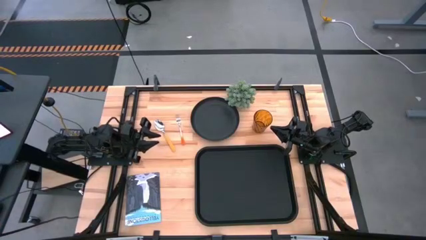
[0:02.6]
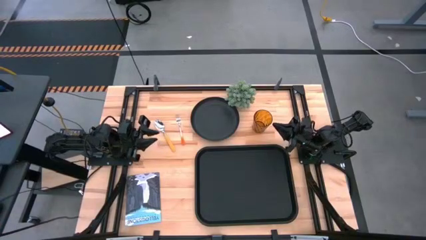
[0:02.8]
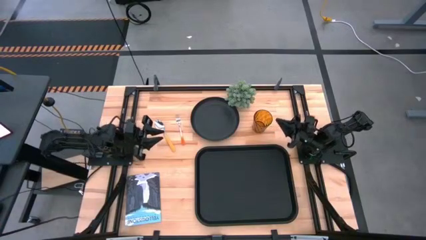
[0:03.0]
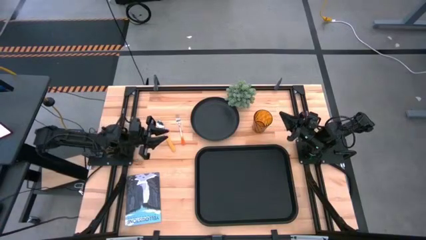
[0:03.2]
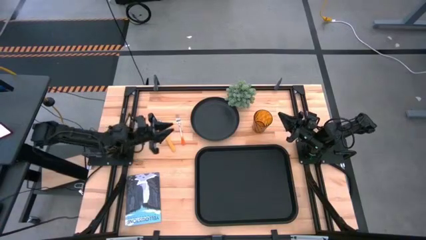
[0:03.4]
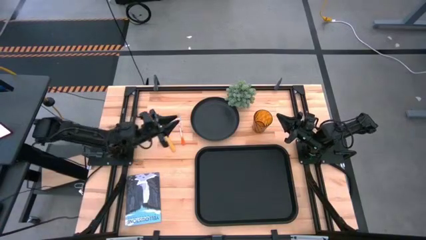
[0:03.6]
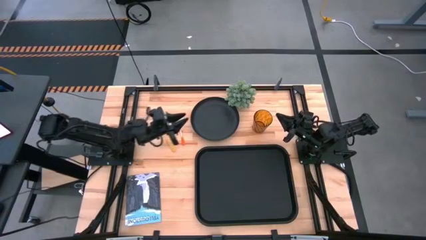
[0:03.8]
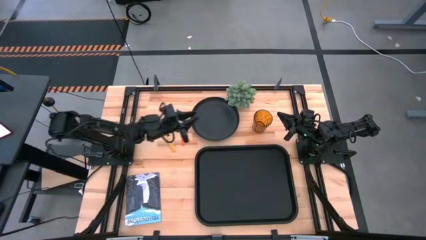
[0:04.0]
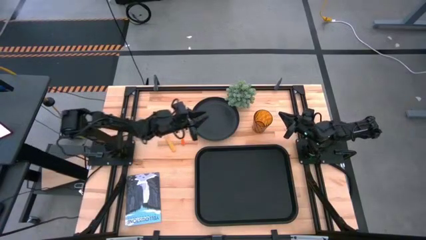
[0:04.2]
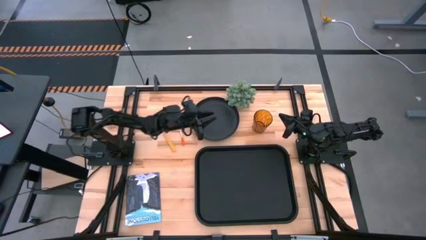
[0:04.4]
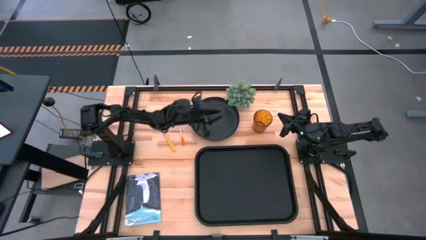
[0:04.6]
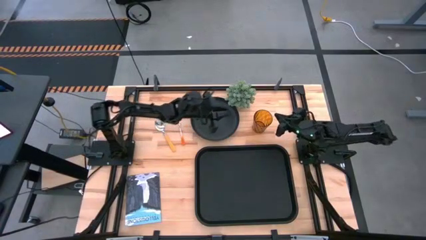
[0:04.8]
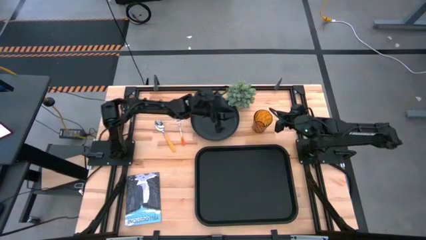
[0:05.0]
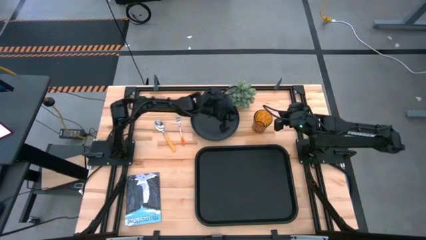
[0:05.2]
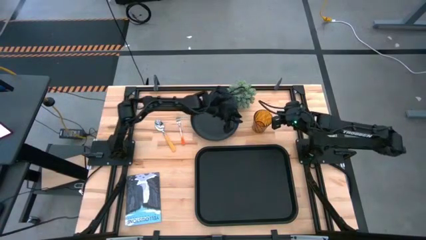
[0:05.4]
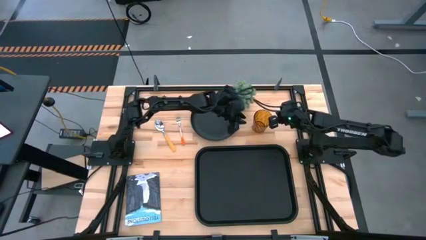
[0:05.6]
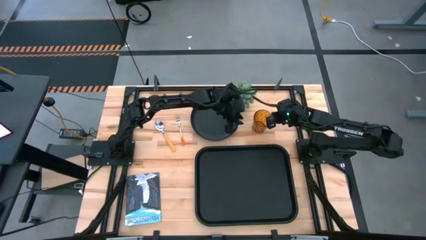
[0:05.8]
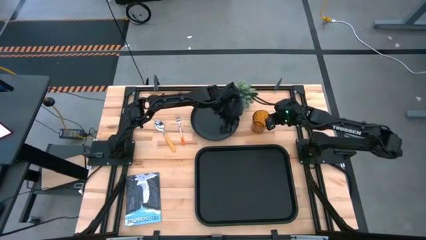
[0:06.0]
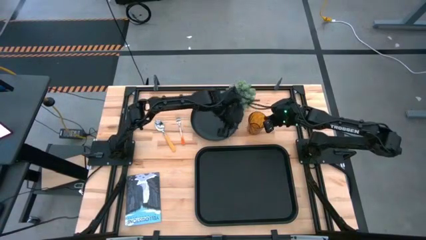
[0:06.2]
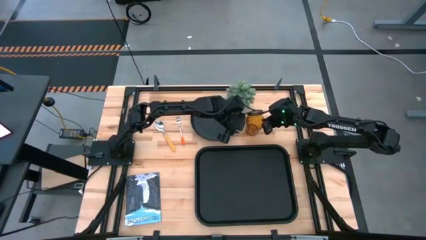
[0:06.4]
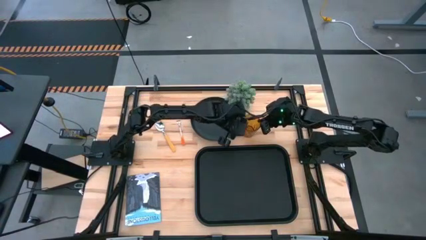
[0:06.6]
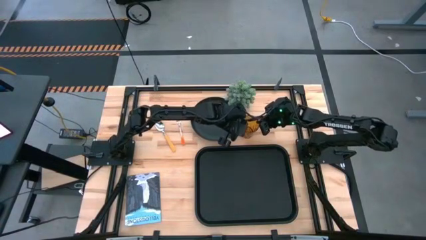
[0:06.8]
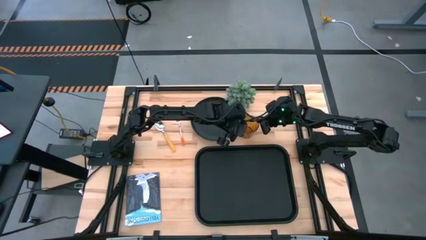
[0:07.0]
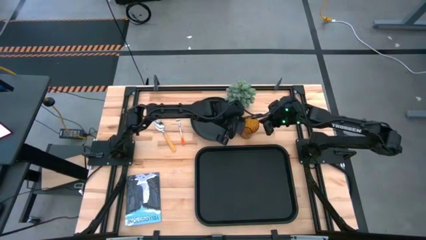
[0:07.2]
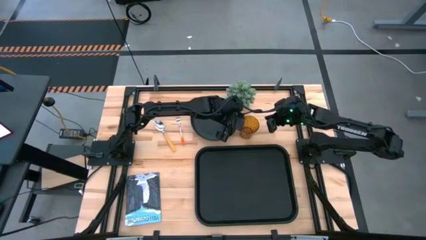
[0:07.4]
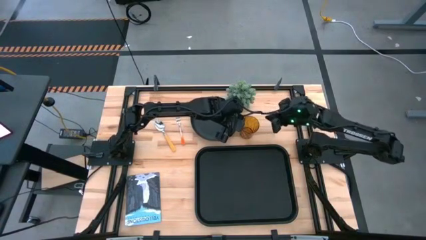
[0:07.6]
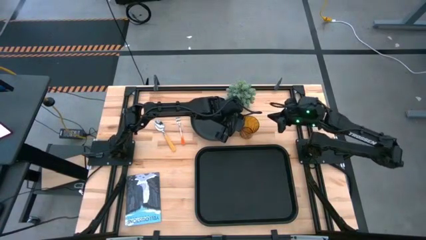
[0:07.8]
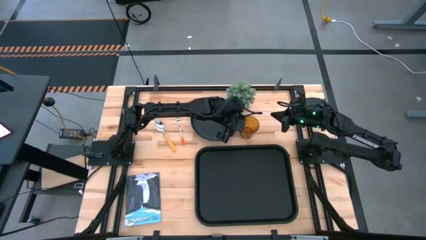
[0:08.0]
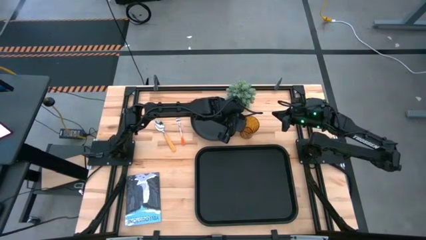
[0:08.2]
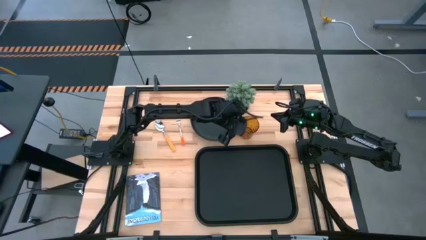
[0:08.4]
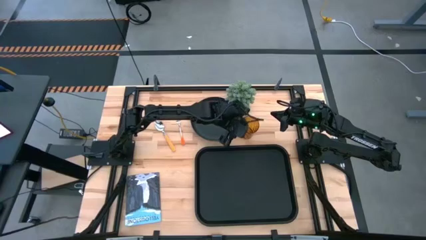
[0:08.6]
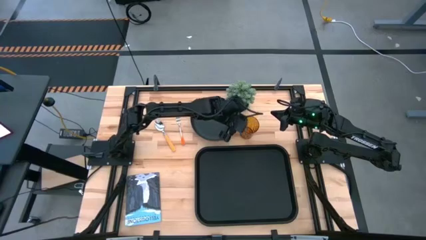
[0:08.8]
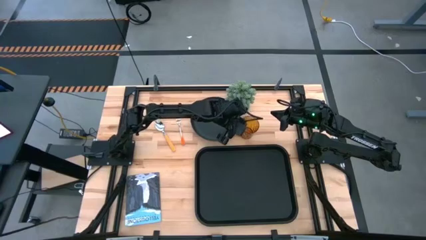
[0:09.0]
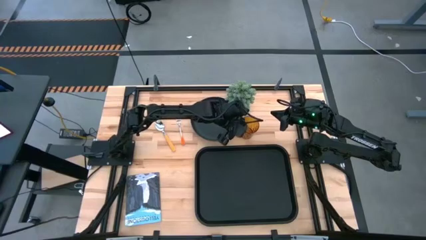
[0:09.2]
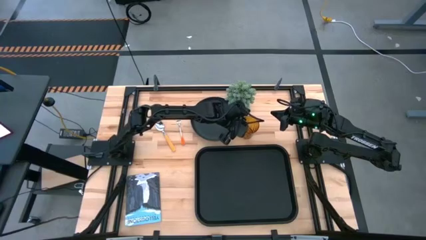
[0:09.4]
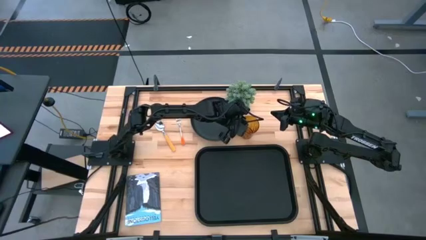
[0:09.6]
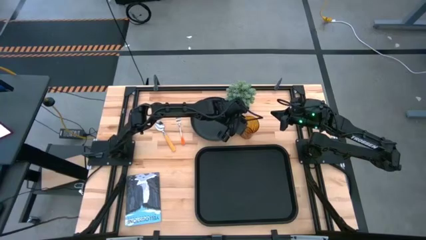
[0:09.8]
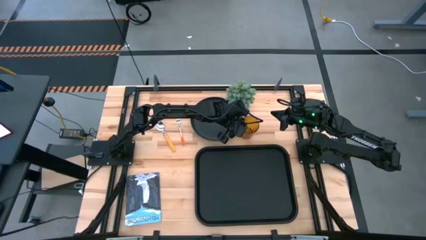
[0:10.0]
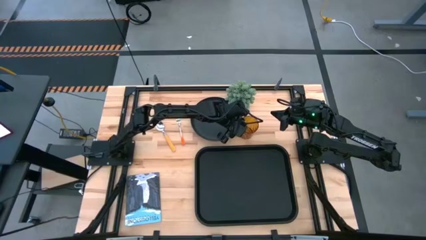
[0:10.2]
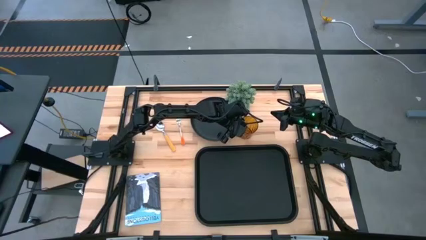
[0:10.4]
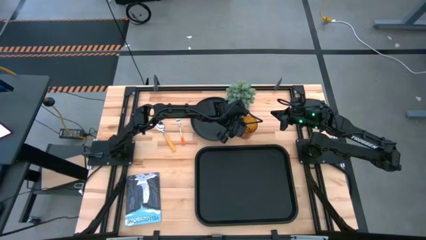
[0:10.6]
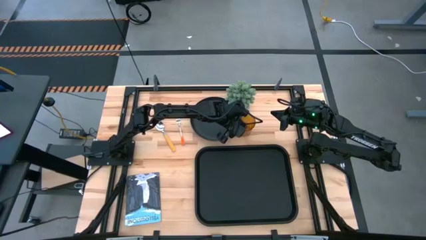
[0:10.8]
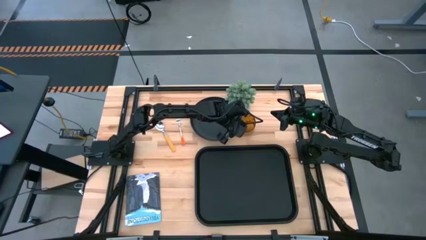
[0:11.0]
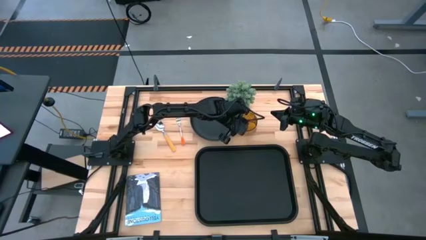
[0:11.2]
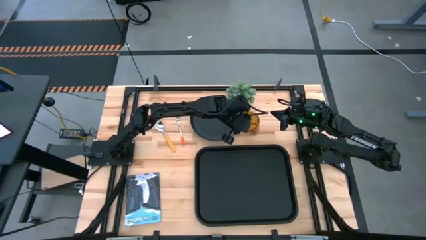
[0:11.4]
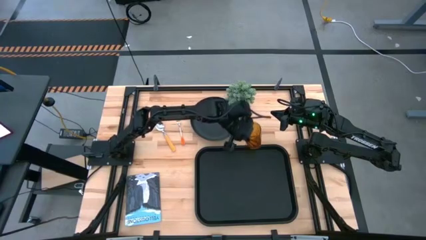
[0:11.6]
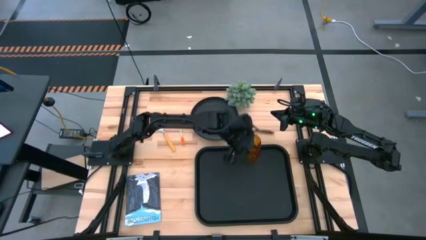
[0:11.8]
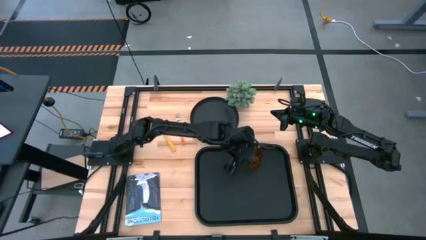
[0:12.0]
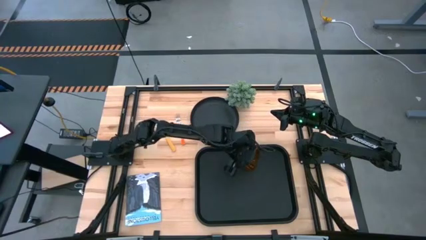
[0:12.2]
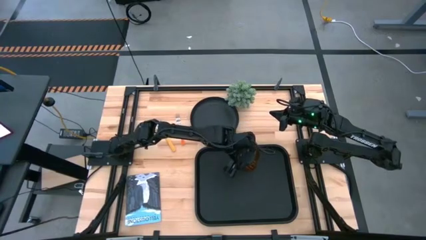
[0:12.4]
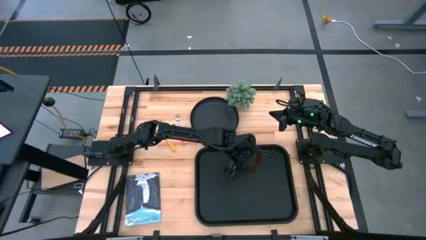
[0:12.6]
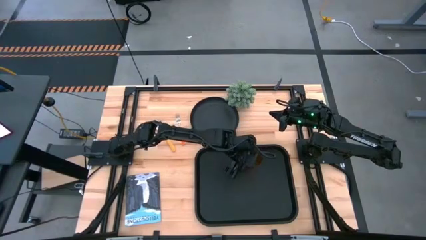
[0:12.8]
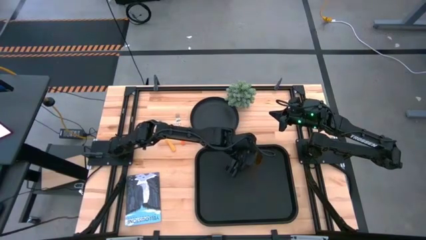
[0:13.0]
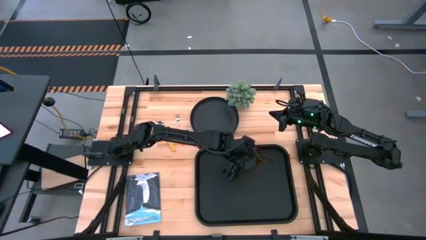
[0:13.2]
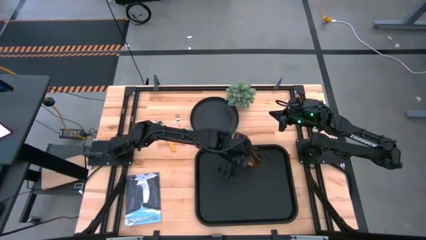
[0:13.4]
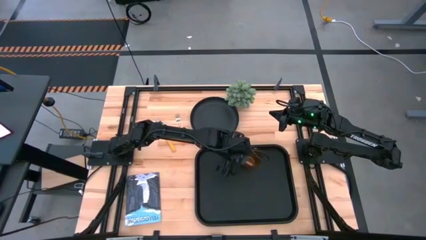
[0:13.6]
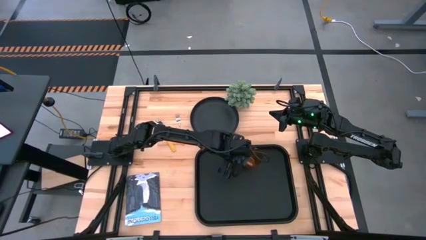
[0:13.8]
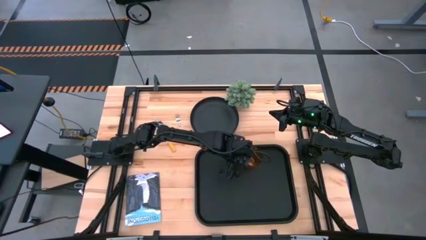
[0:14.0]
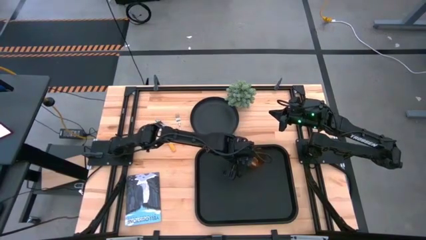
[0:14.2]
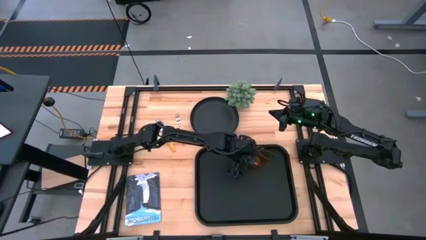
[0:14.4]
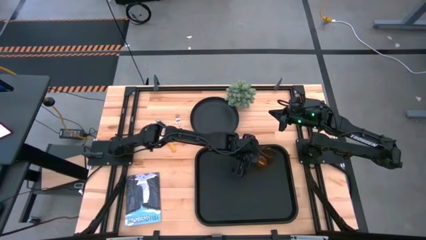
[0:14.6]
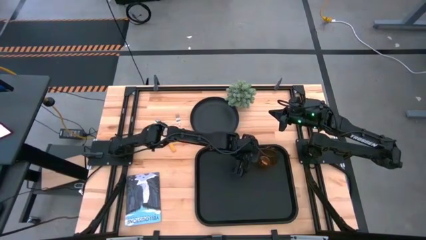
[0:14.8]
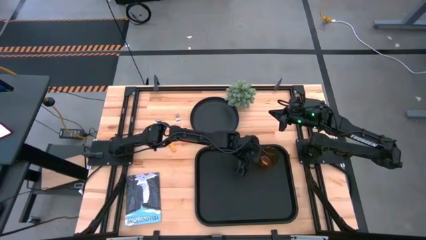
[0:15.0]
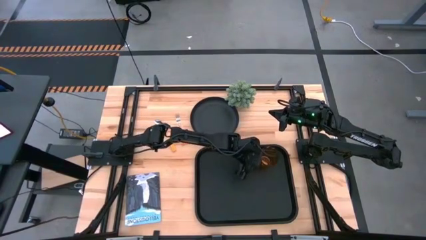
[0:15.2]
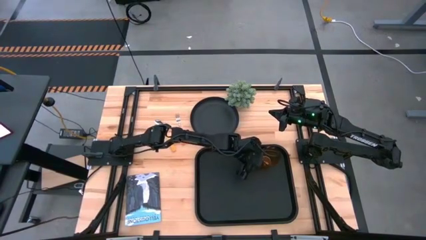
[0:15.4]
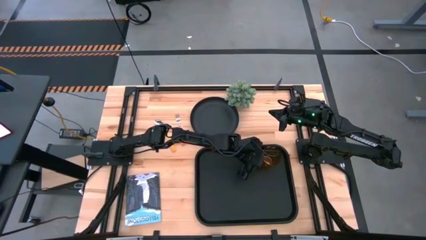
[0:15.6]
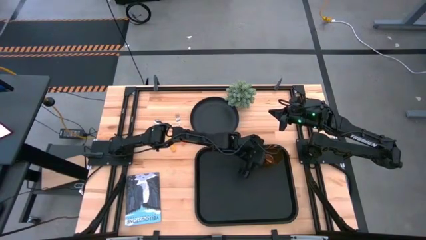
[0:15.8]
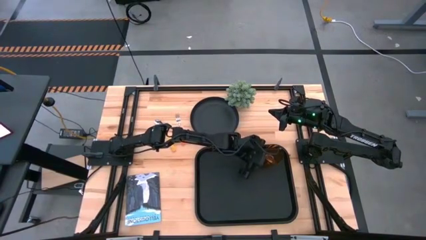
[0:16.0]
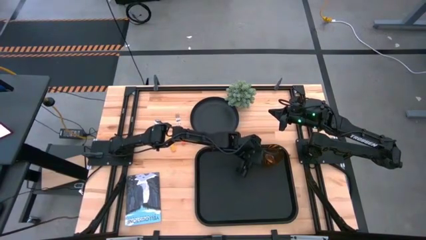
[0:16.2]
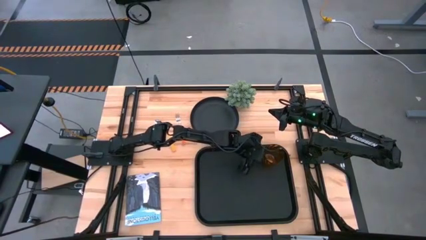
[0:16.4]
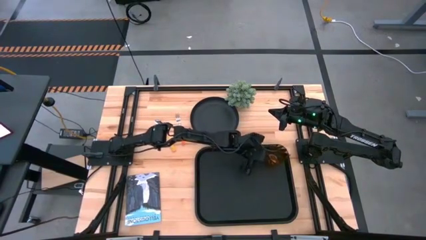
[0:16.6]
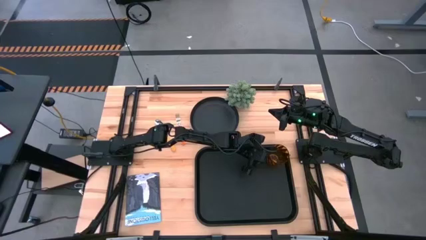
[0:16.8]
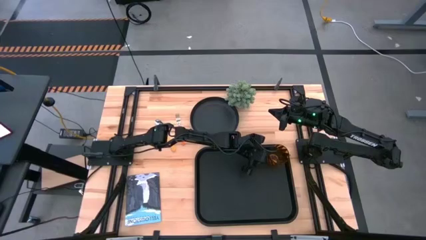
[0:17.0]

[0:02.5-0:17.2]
Task: Pick and place plate/cup/fork/spoon on tray
Put the brown glass on the top of the black tray

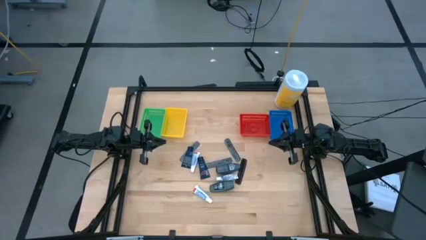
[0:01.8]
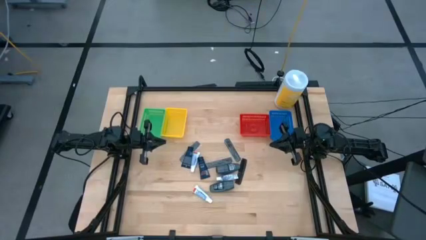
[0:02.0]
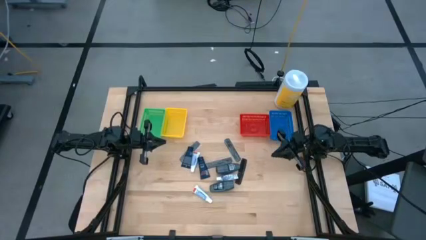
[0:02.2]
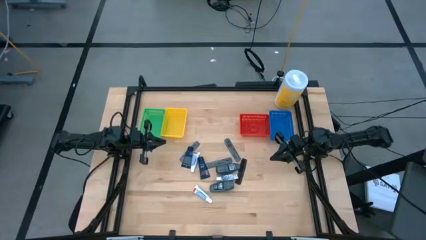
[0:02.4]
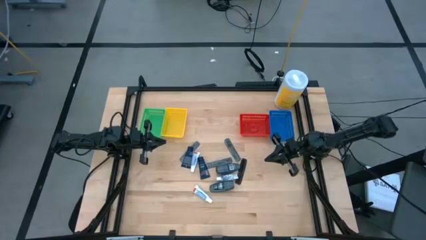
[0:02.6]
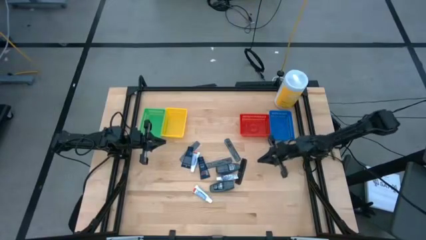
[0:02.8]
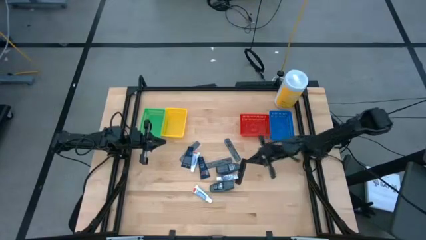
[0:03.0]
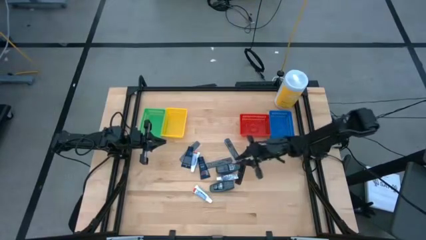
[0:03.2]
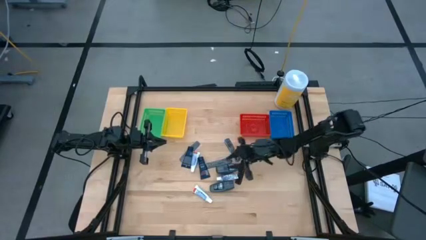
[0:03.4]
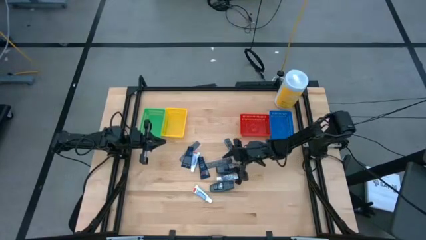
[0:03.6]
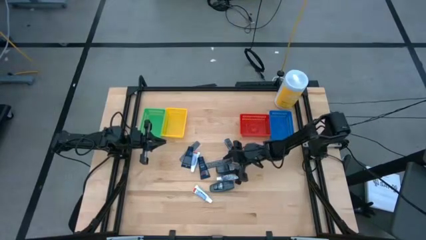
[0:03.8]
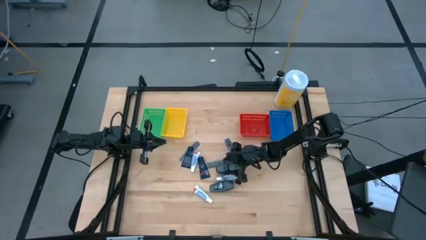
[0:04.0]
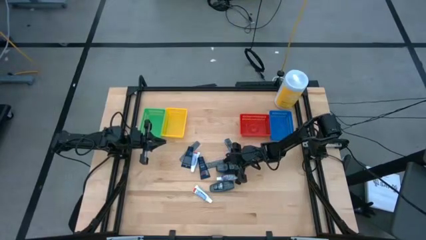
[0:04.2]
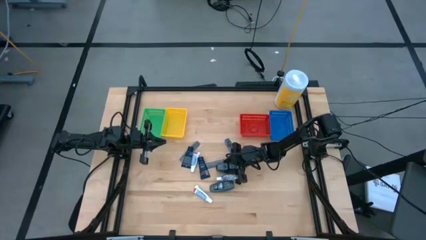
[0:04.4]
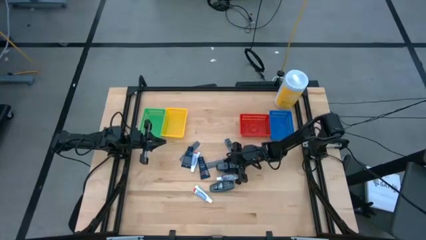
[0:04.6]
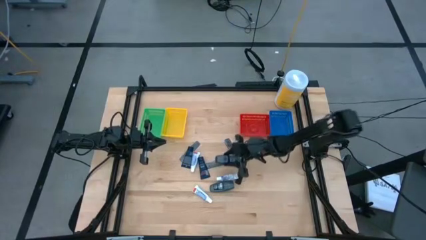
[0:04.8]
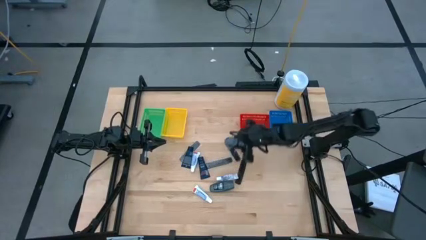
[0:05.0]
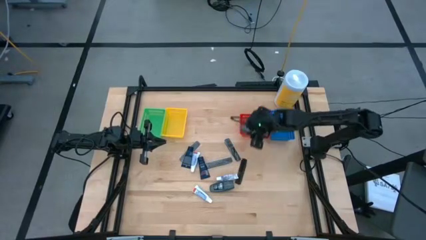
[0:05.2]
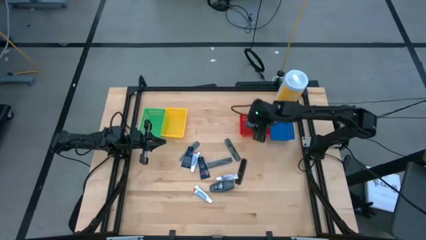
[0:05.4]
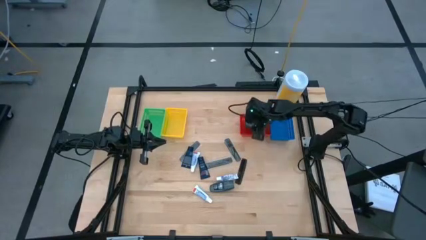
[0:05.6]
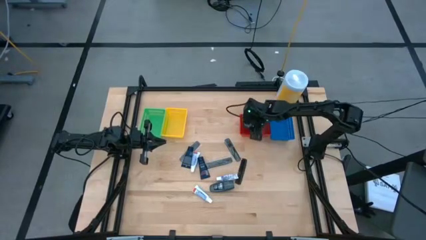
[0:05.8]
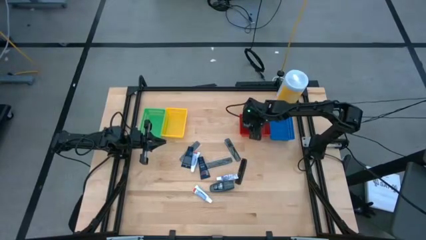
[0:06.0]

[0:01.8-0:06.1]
Task: Pick & Place Travel size toiletries
Put the deodorant into the red bin
